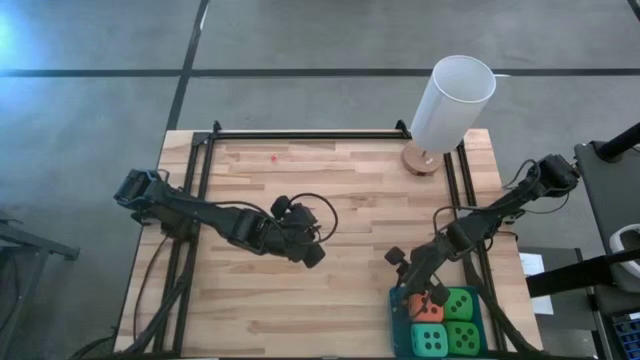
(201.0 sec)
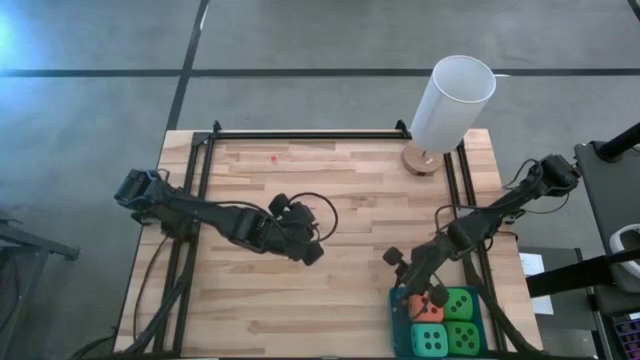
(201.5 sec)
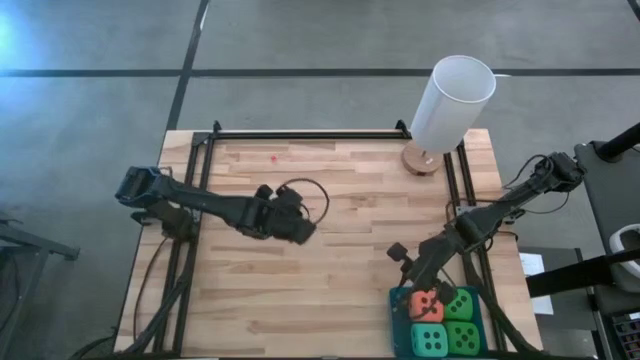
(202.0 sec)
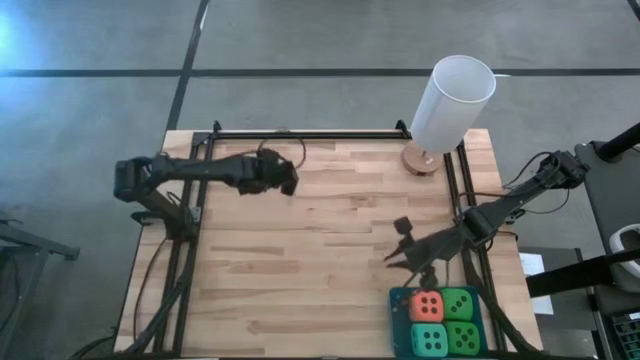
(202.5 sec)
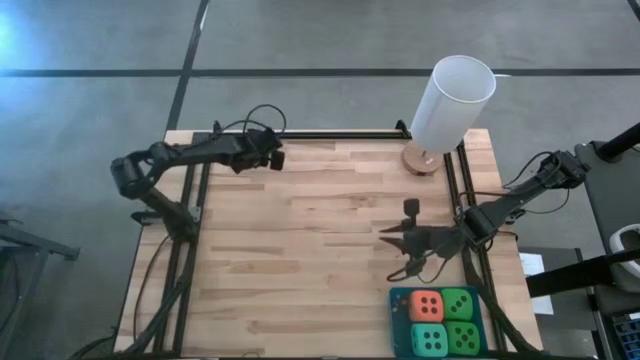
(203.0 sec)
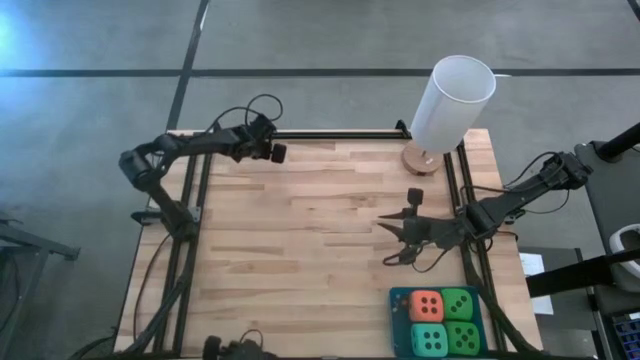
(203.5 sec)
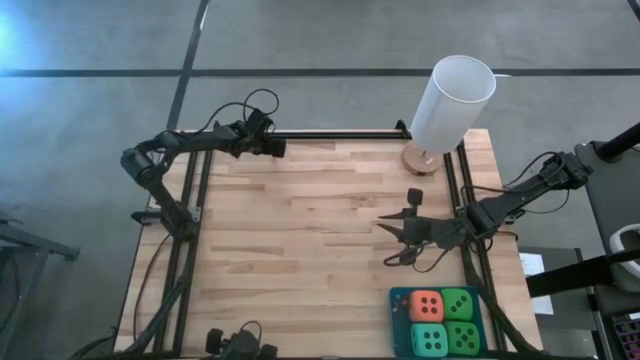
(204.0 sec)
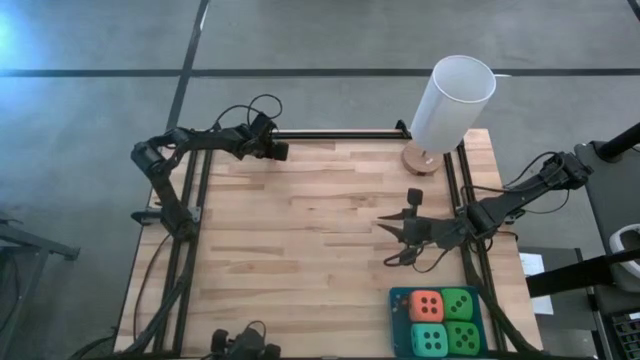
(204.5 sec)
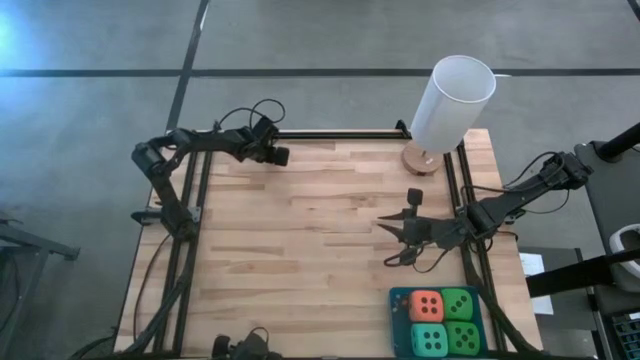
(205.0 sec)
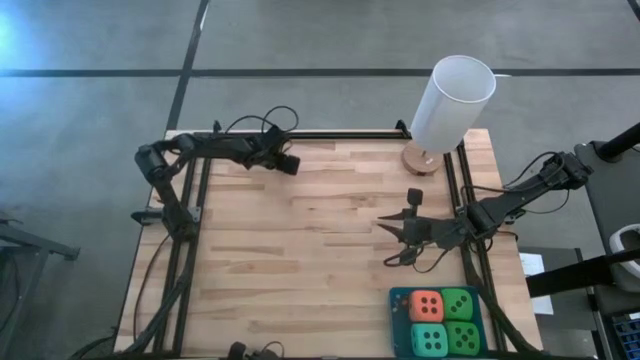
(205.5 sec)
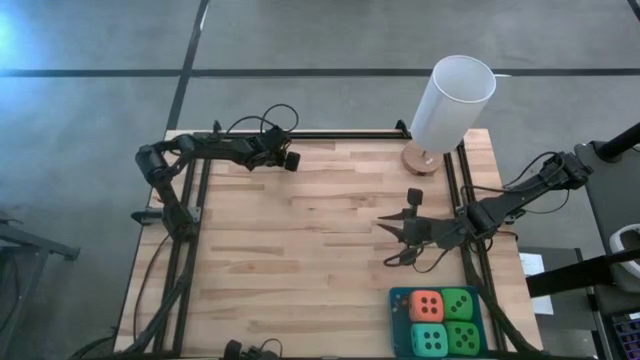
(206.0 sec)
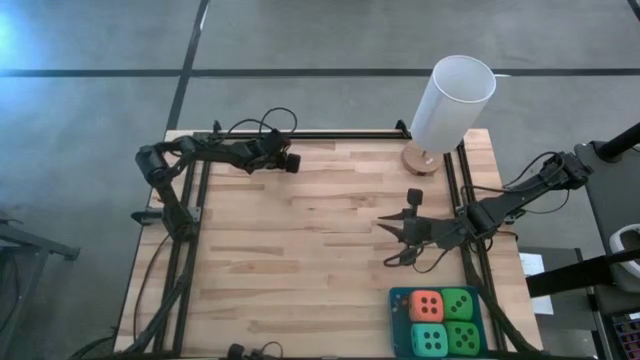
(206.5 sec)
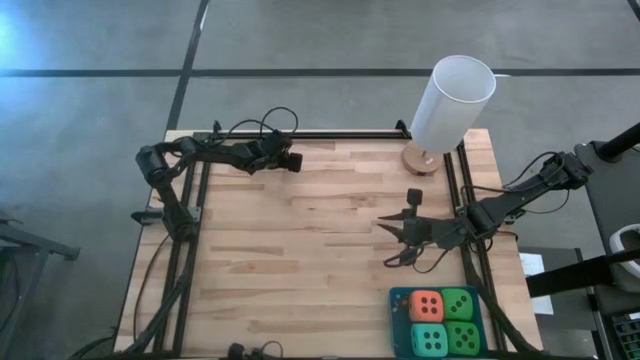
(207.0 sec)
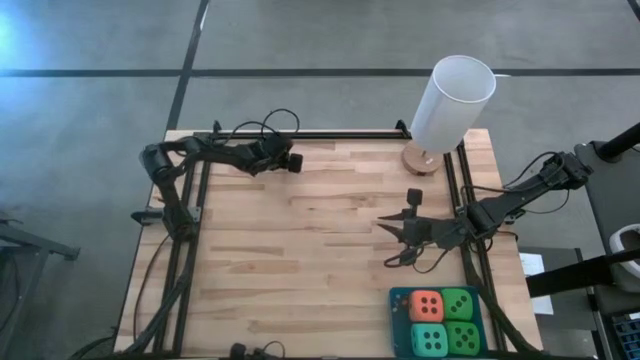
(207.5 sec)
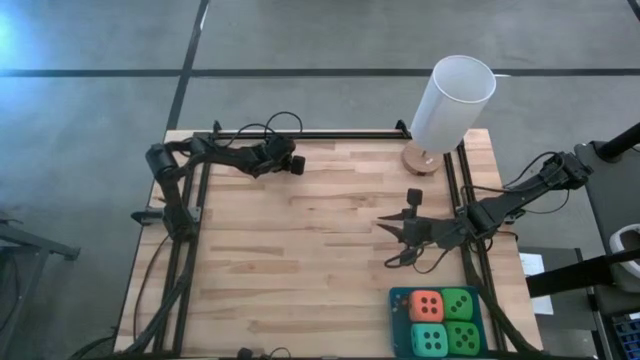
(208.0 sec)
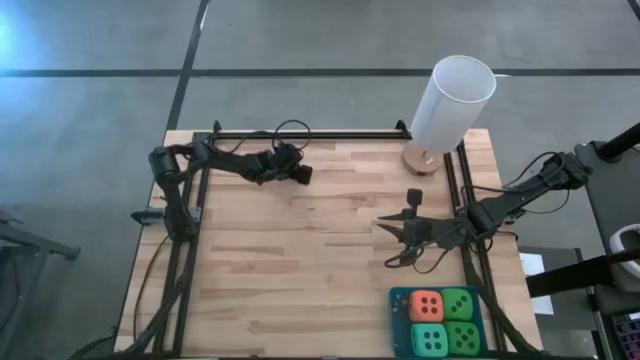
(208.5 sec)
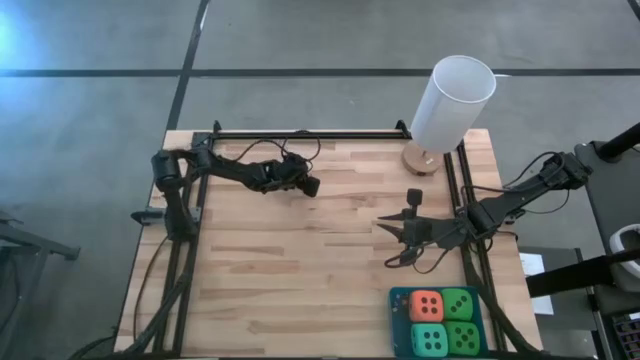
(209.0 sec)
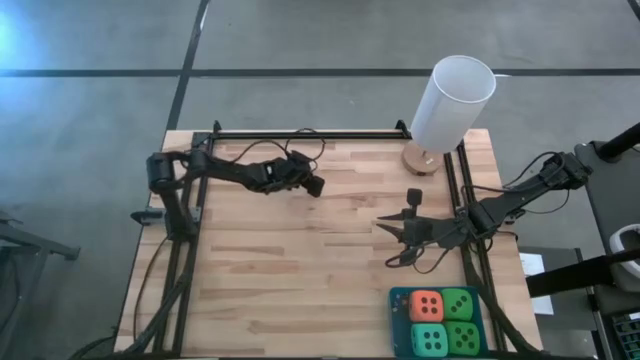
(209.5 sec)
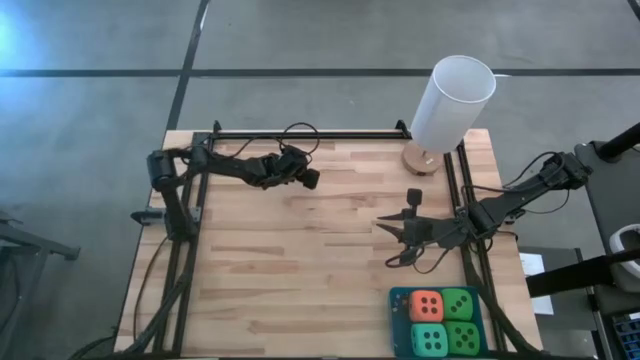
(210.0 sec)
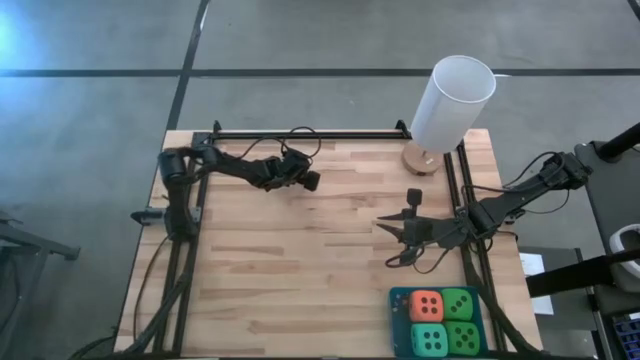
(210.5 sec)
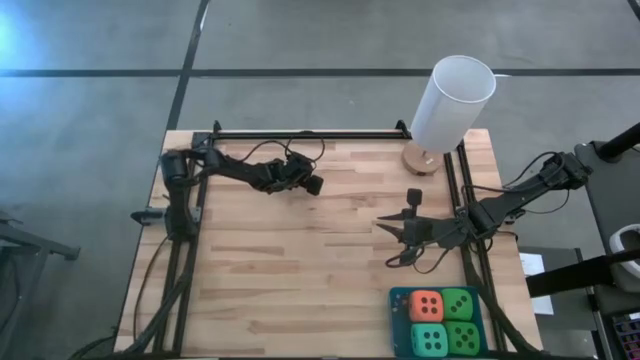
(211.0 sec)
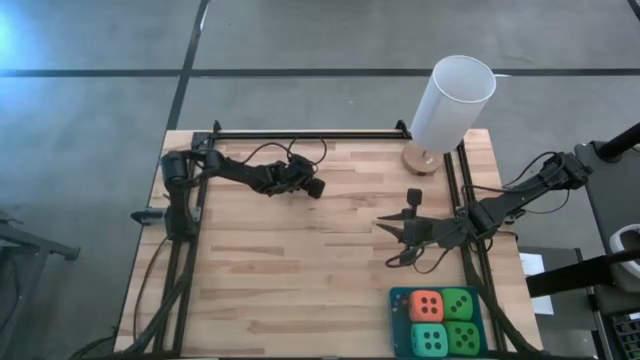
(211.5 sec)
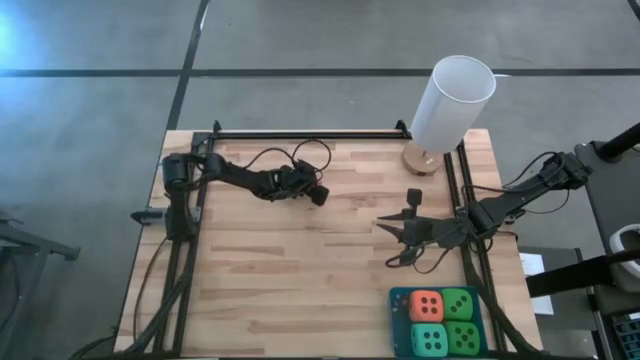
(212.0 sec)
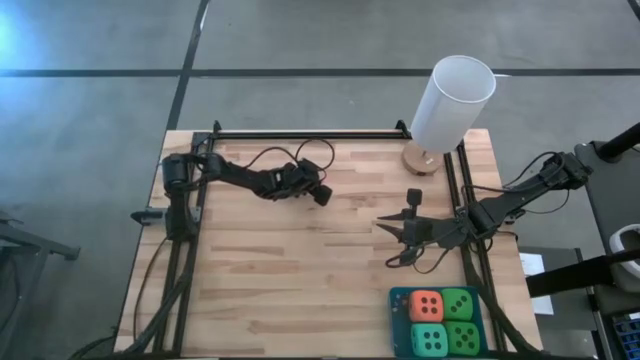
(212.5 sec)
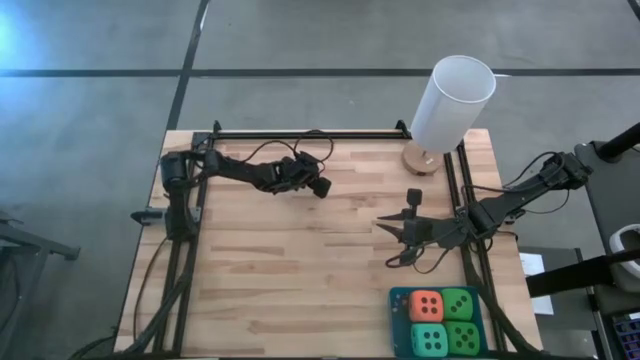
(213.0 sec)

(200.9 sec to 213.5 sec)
Task: Pick & Place Dice
Put the small pink die into the blue bin

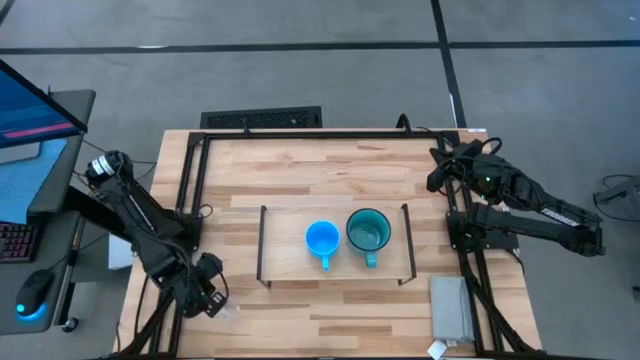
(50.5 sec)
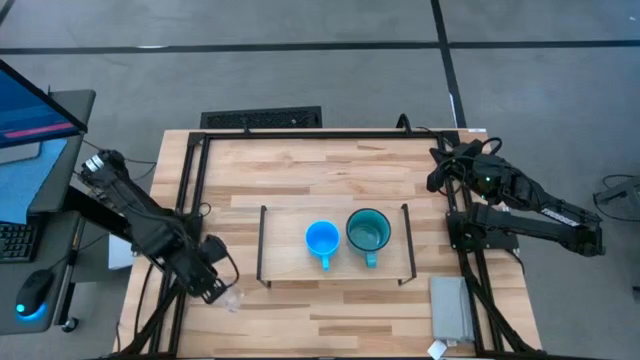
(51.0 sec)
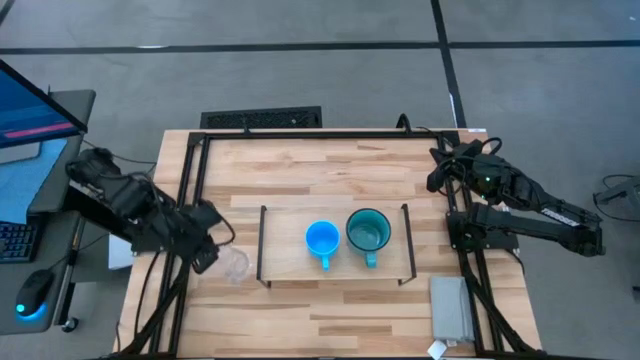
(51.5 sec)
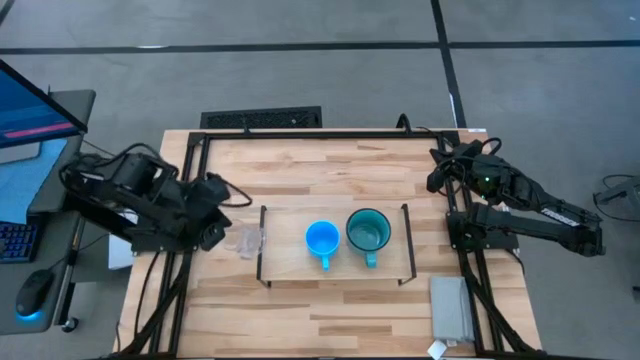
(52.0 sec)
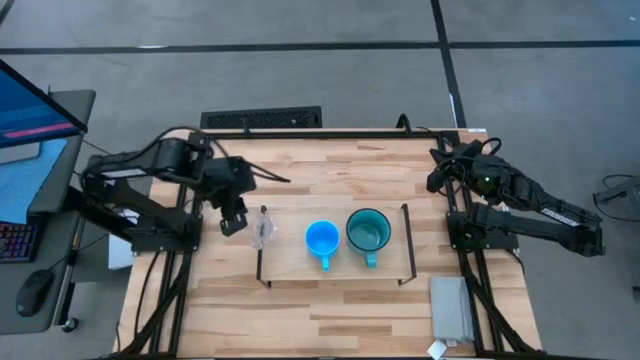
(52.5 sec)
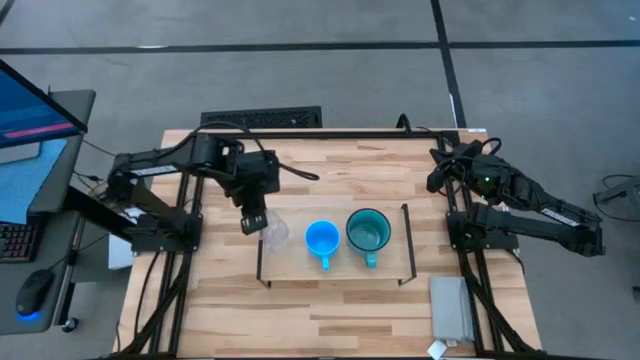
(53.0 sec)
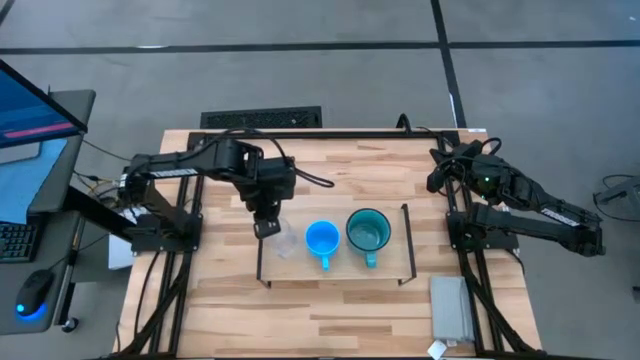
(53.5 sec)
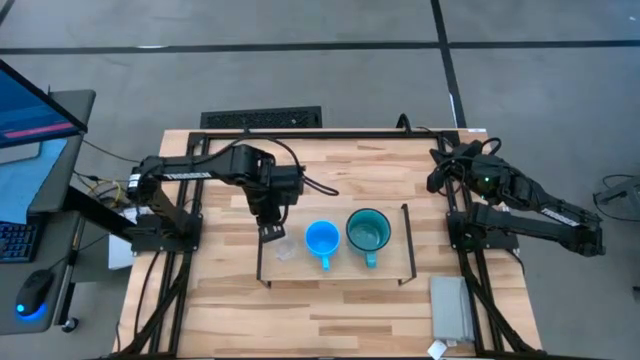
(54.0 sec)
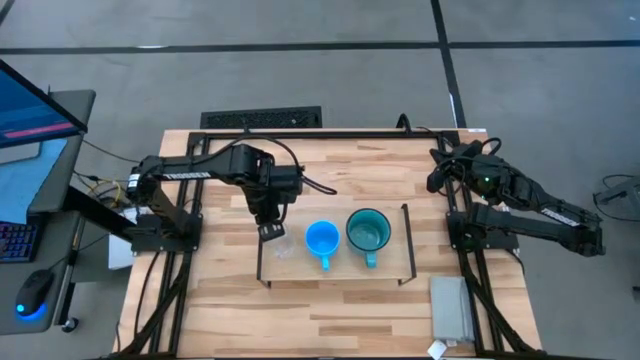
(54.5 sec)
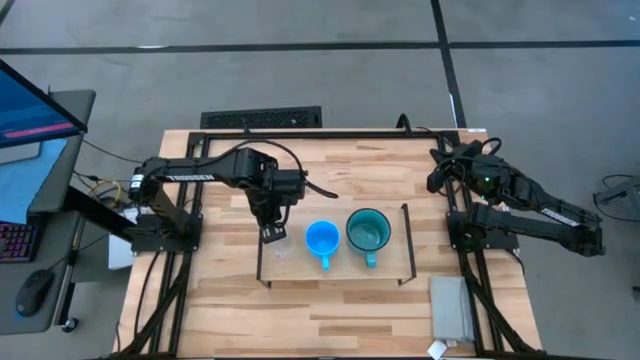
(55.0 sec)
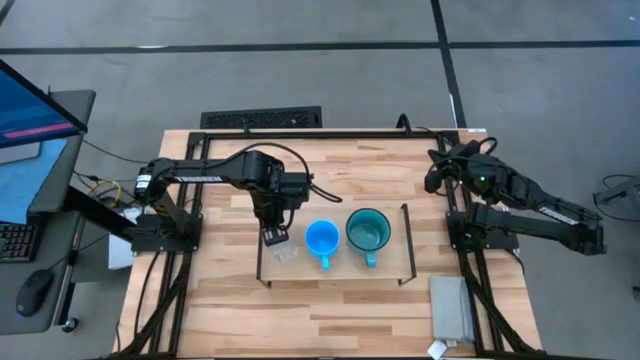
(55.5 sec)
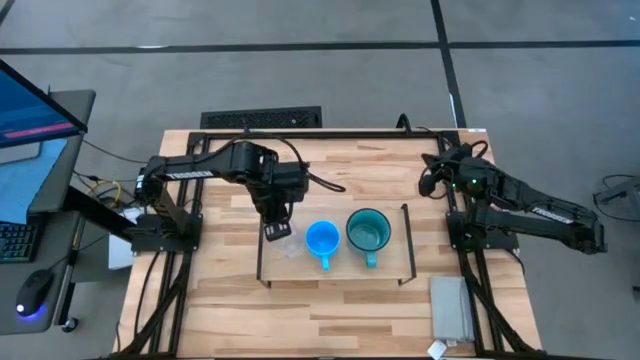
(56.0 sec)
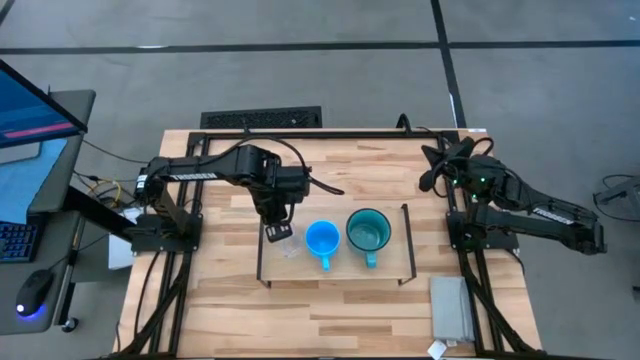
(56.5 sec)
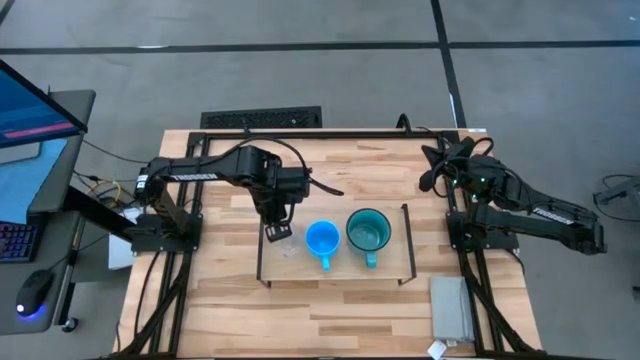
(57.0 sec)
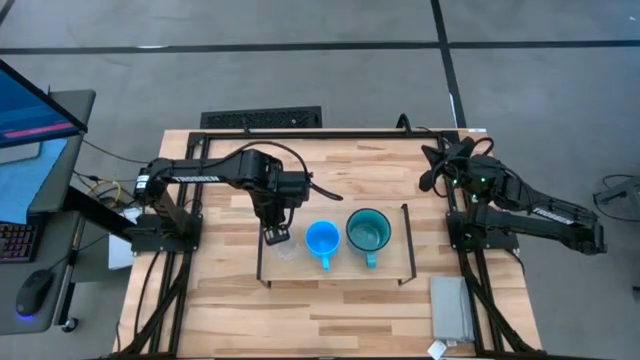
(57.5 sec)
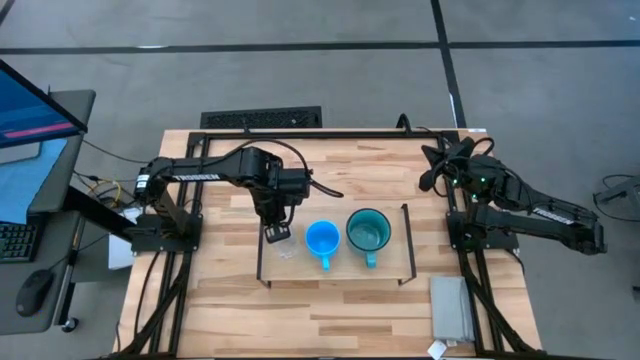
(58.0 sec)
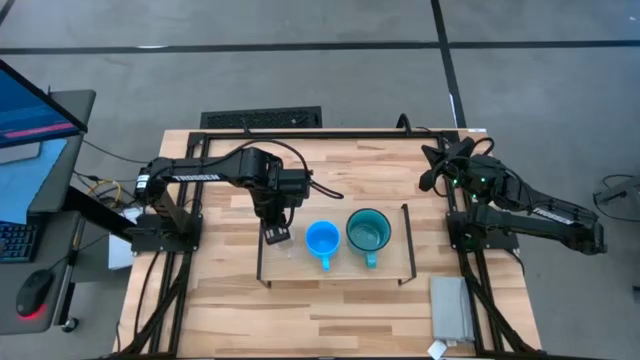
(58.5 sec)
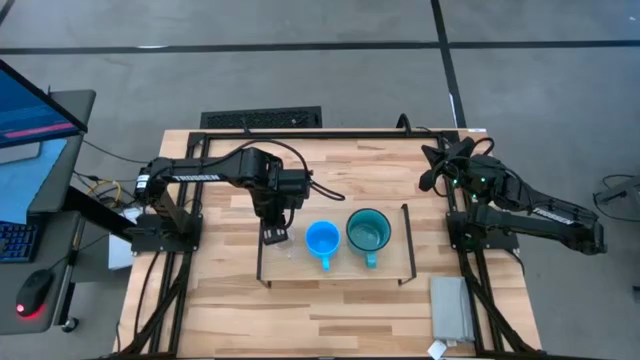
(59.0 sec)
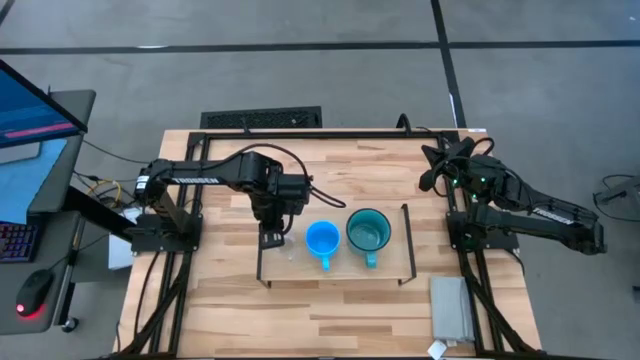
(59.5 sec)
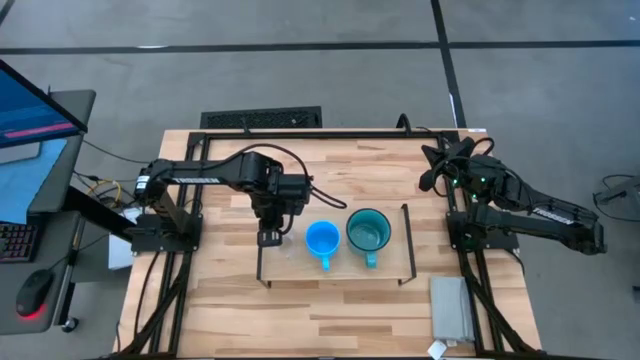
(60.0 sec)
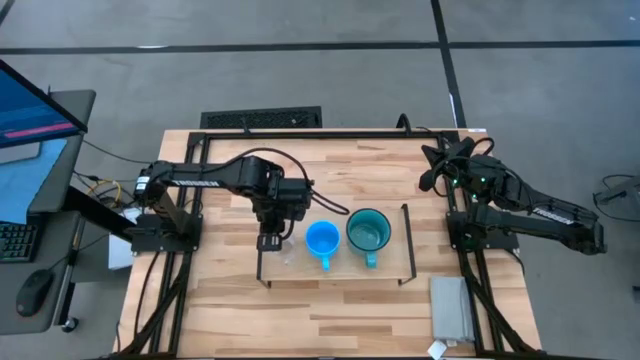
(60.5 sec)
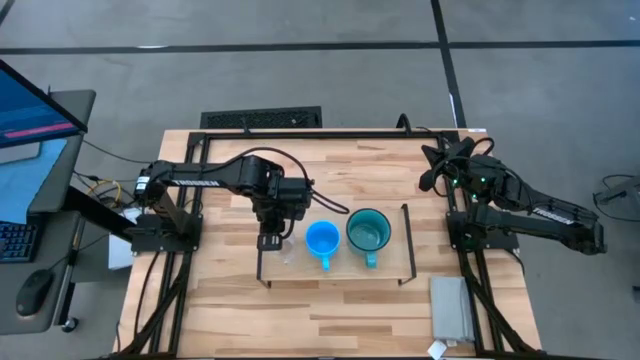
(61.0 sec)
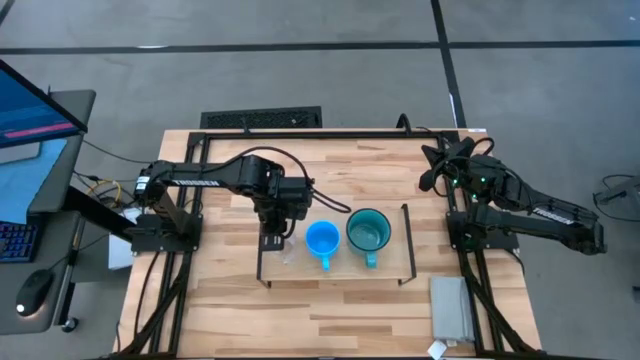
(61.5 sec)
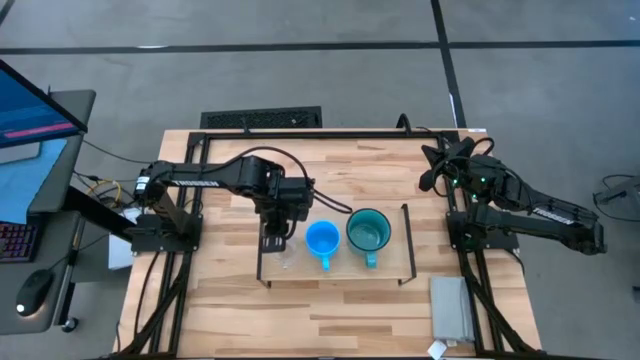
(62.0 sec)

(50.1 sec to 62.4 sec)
Task: Stack small to large cups/mugs on shelf
Put the transparent mug on the shelf
